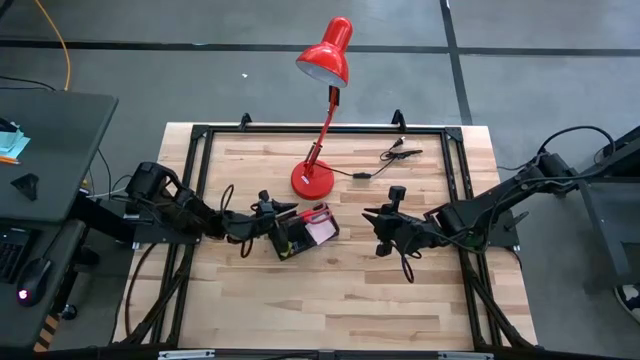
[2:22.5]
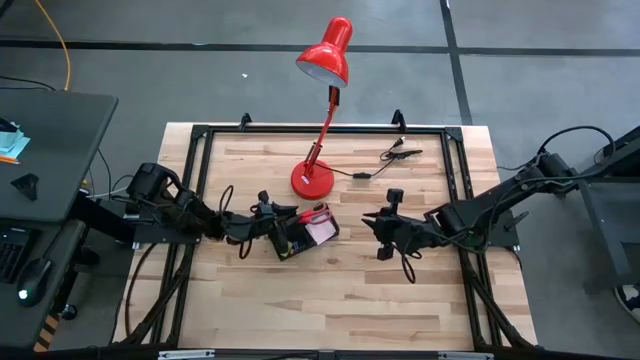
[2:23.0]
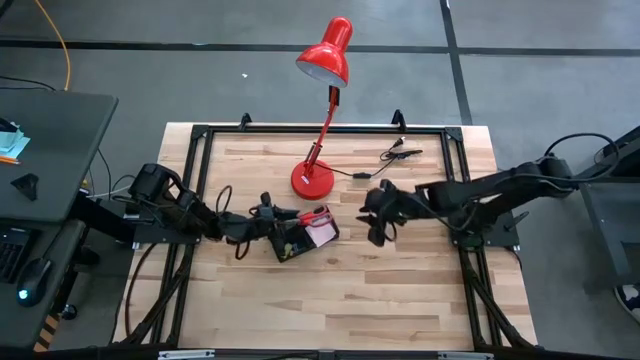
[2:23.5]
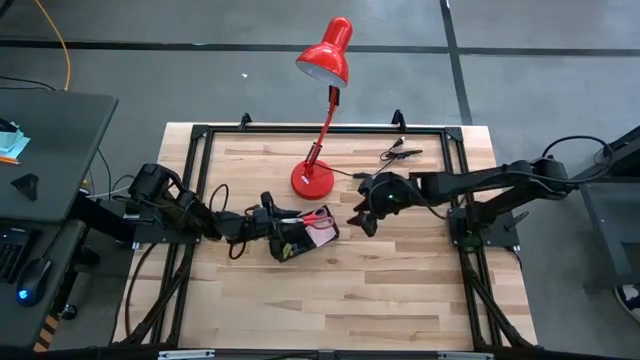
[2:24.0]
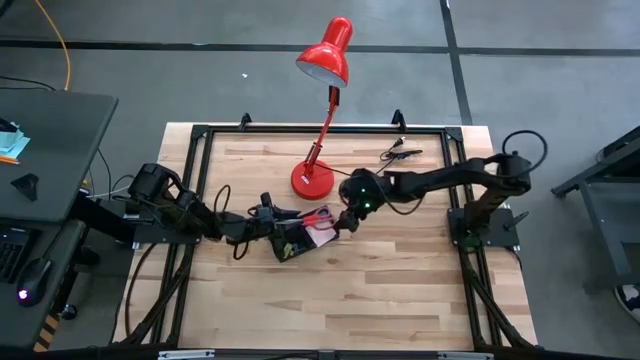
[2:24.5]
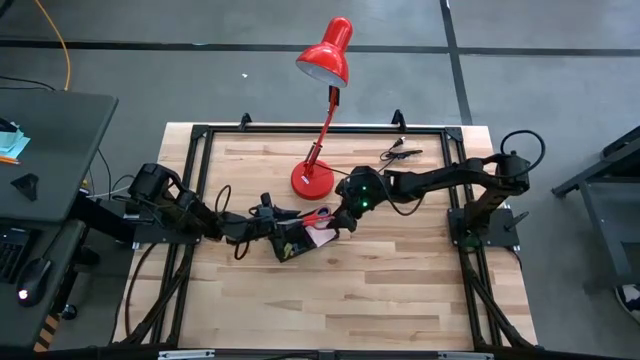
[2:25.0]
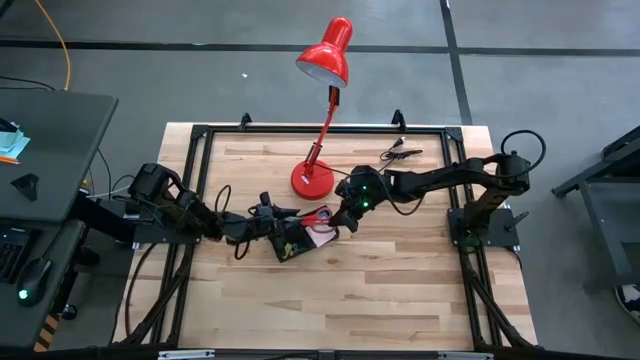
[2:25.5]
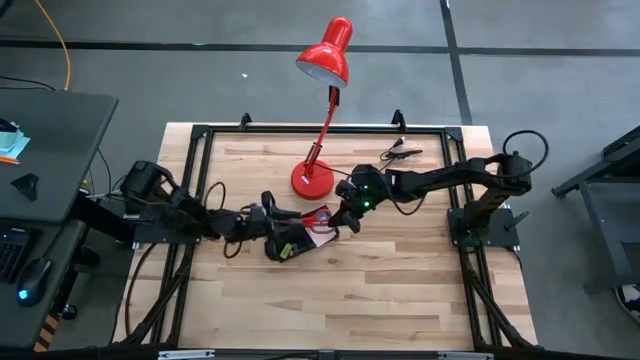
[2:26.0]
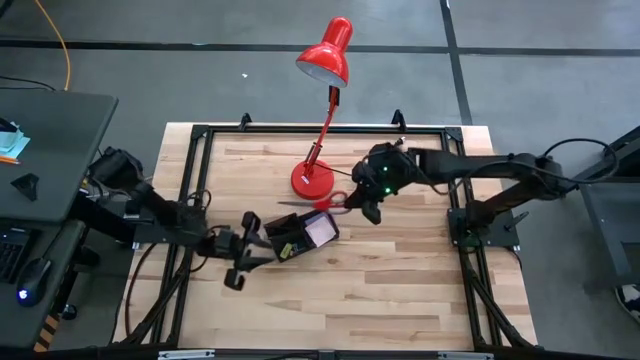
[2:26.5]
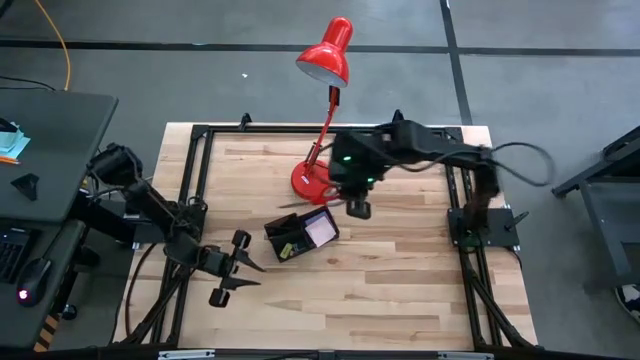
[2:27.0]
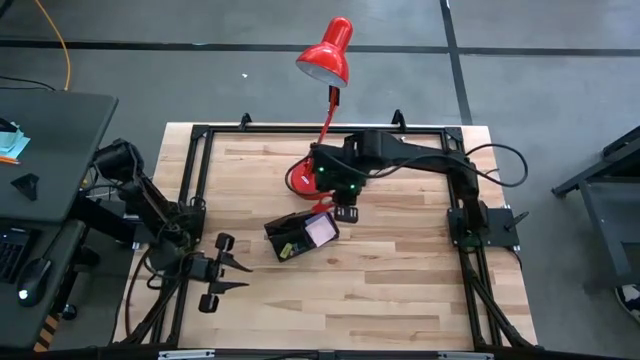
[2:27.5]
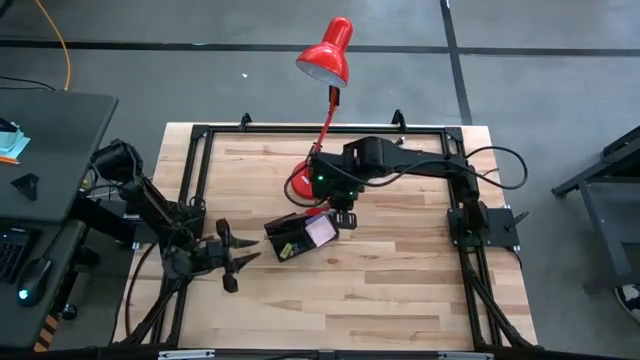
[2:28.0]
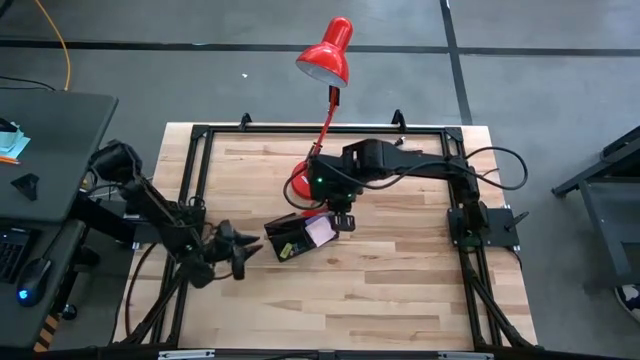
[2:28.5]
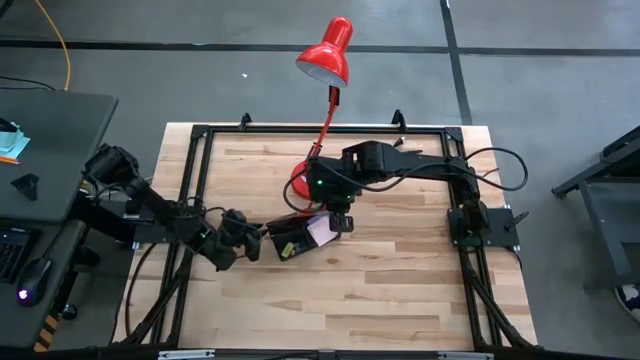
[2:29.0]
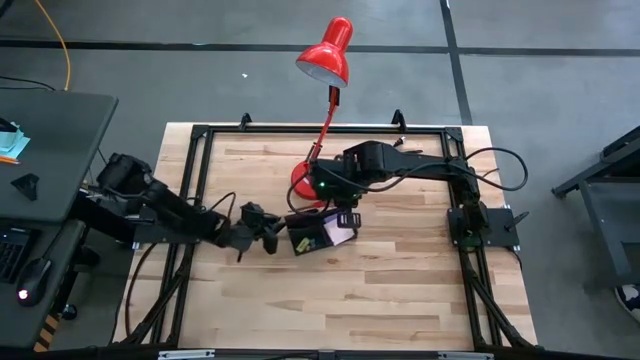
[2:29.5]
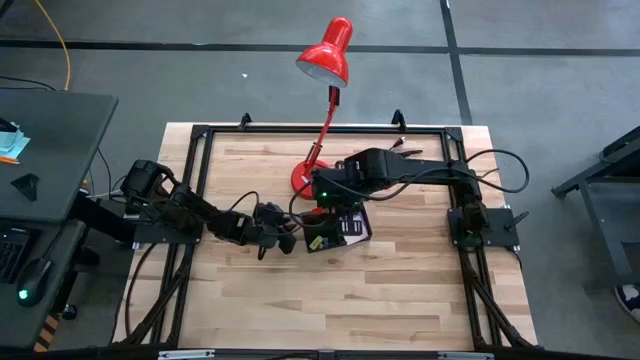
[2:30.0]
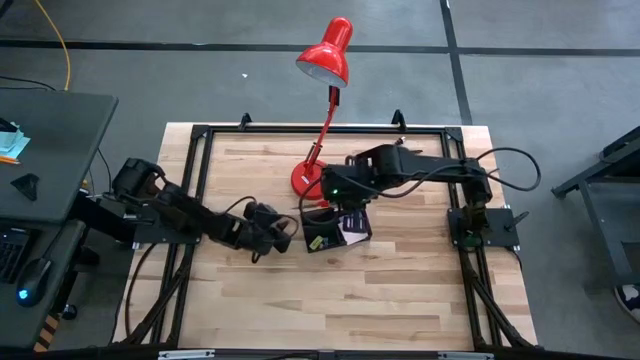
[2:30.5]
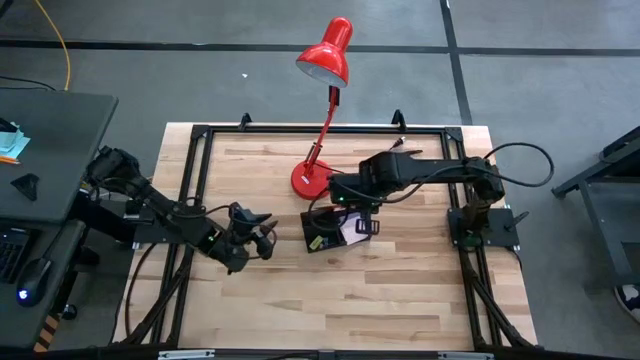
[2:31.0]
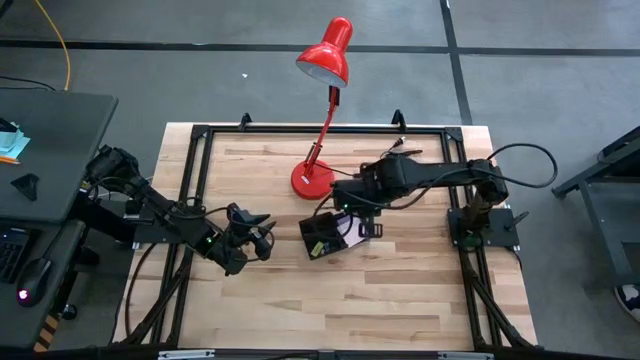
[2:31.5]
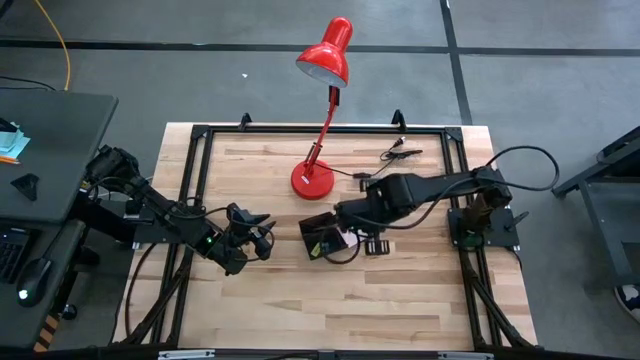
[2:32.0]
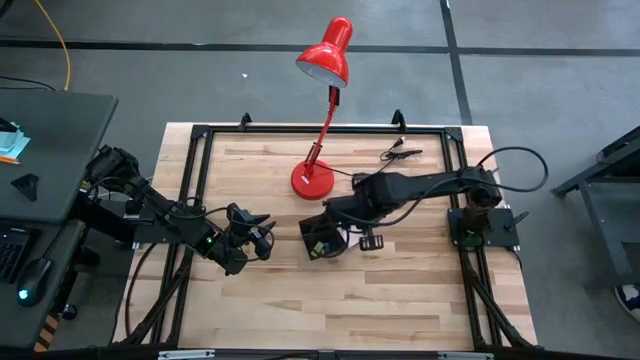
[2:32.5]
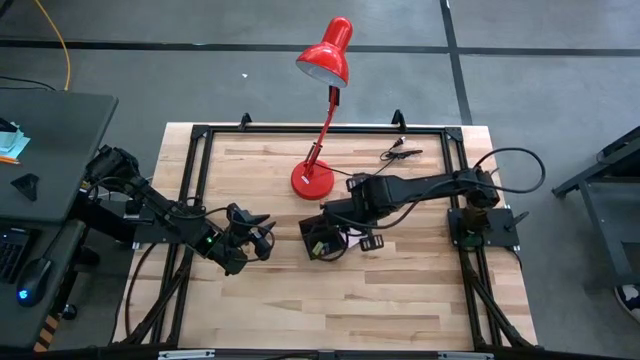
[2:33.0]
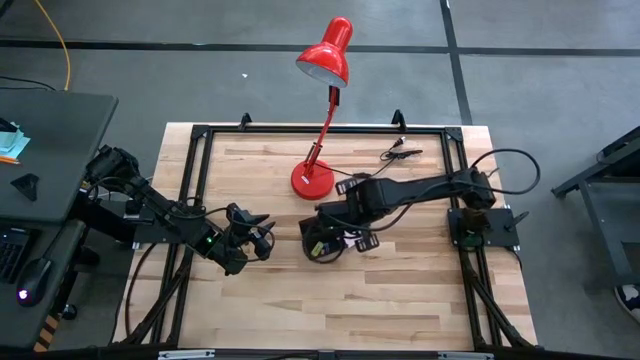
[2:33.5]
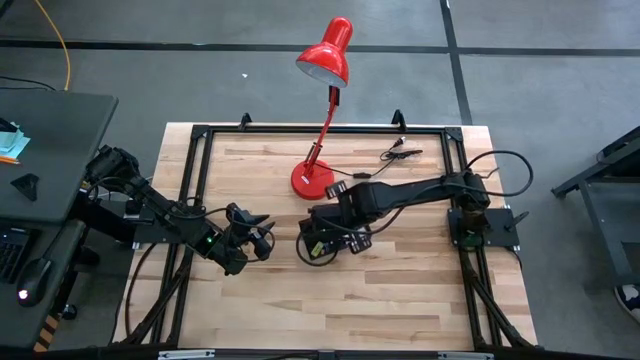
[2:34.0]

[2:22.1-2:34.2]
Task: Pick and place office supplies into organizer
Put the red scissors into the black desk organizer

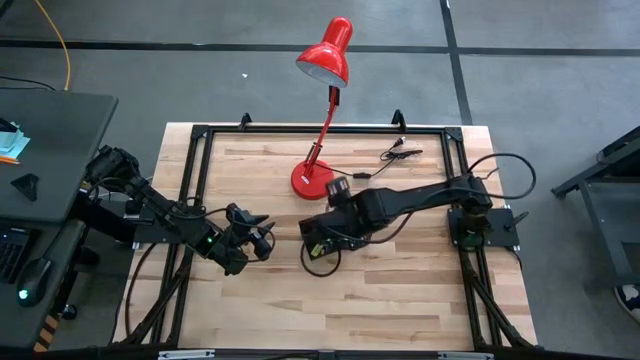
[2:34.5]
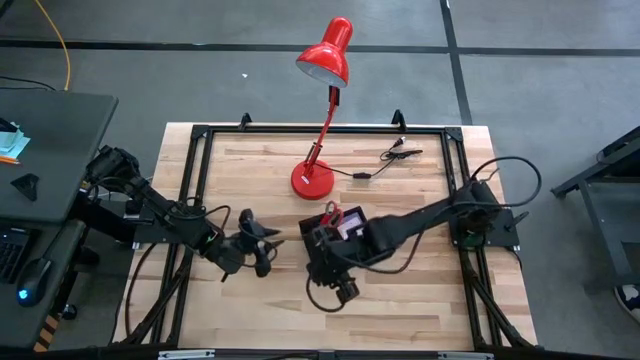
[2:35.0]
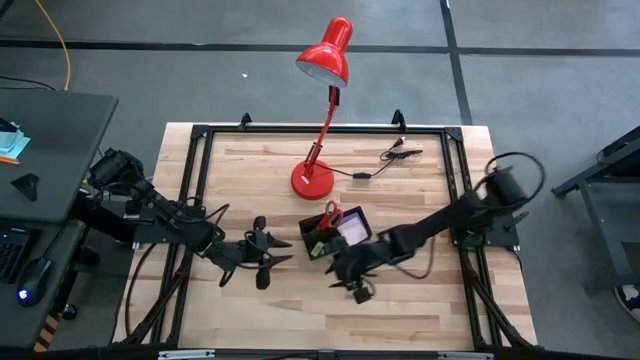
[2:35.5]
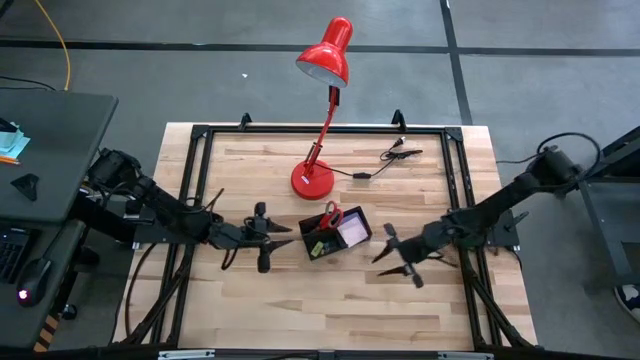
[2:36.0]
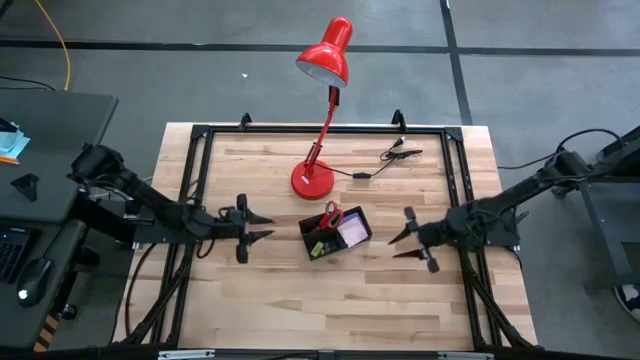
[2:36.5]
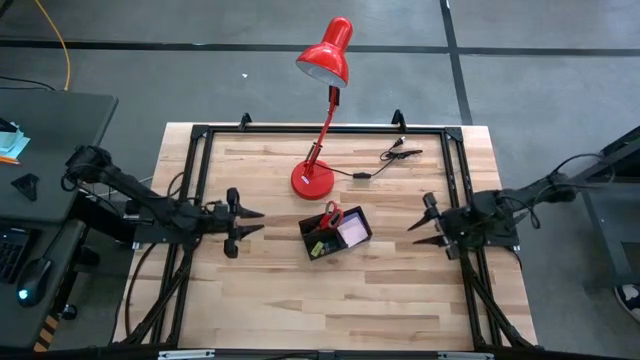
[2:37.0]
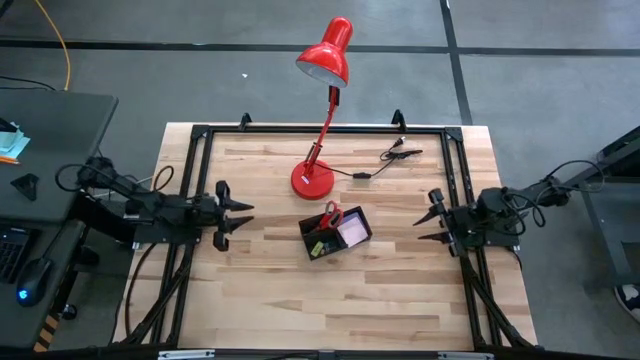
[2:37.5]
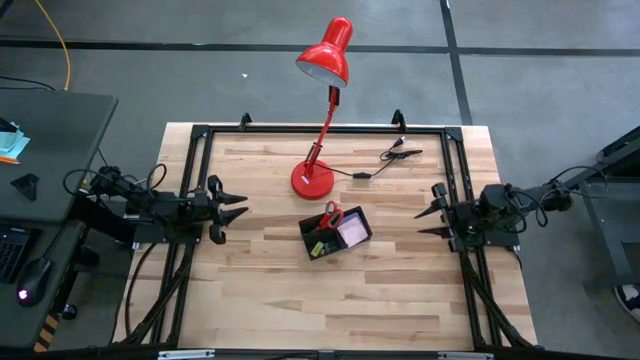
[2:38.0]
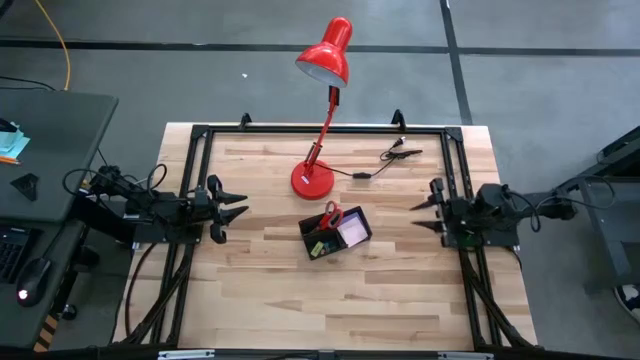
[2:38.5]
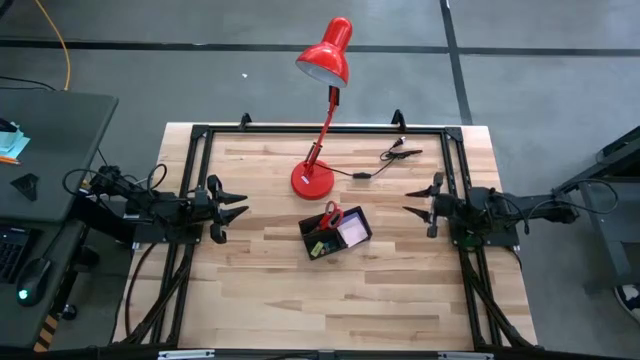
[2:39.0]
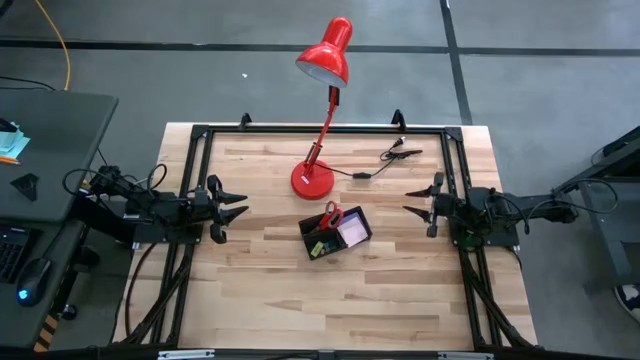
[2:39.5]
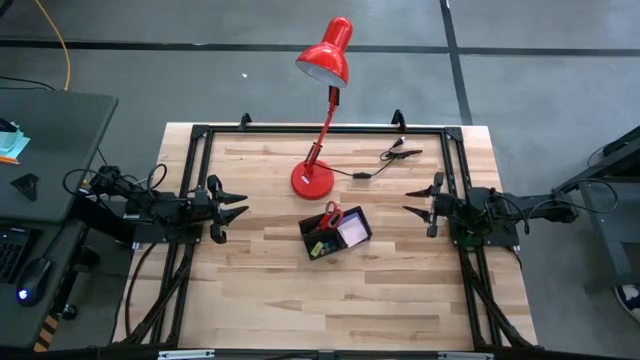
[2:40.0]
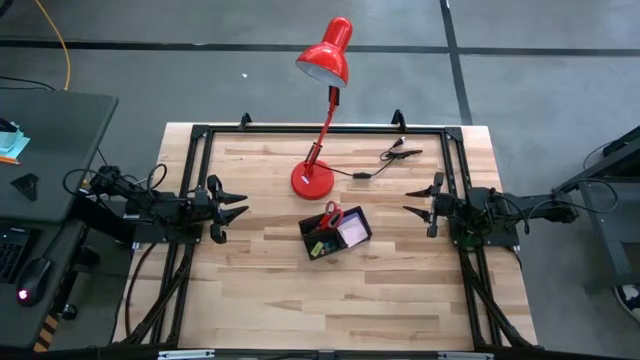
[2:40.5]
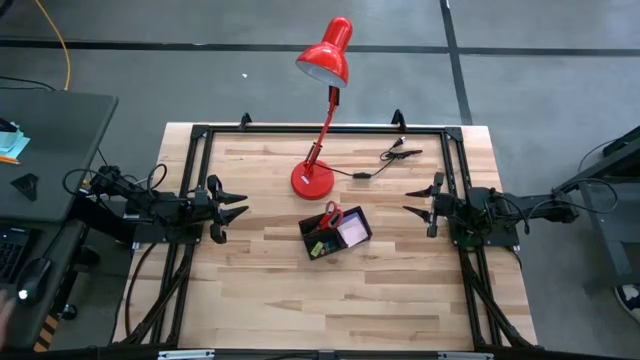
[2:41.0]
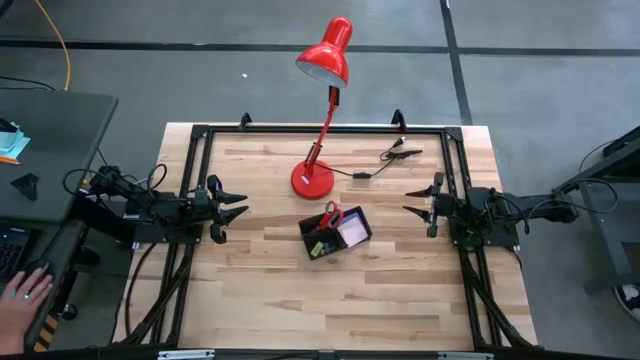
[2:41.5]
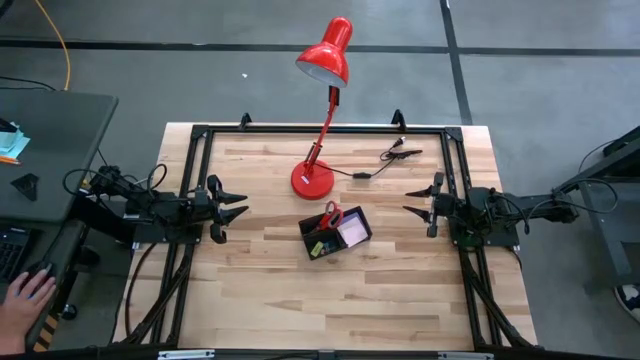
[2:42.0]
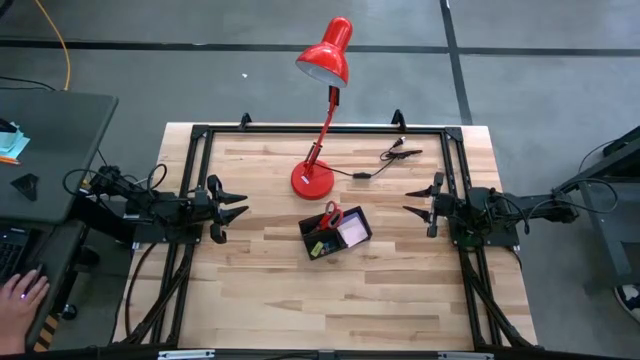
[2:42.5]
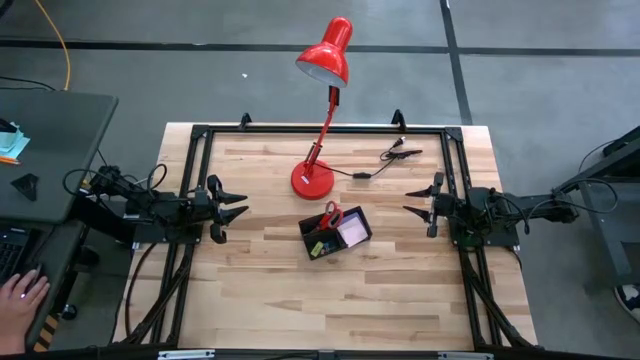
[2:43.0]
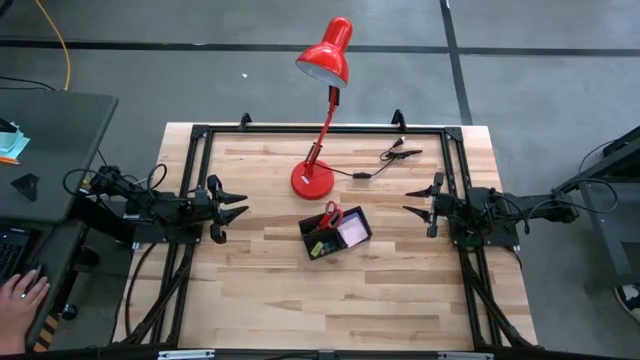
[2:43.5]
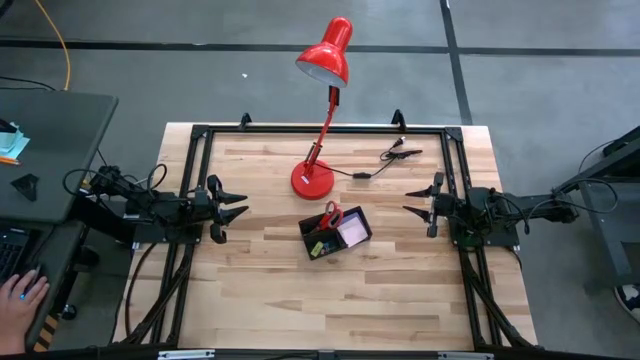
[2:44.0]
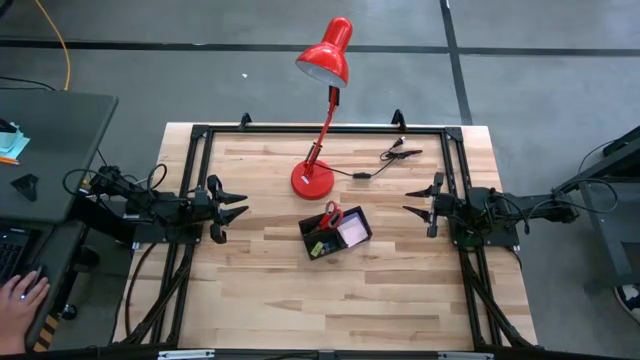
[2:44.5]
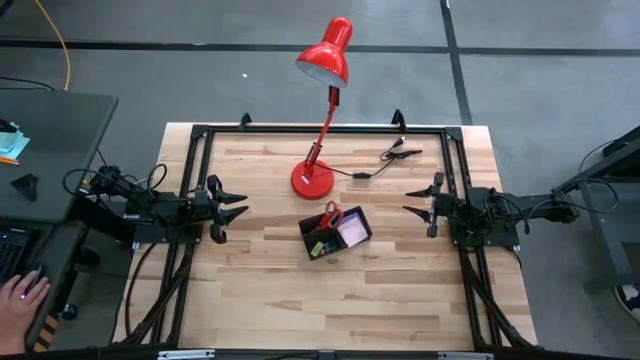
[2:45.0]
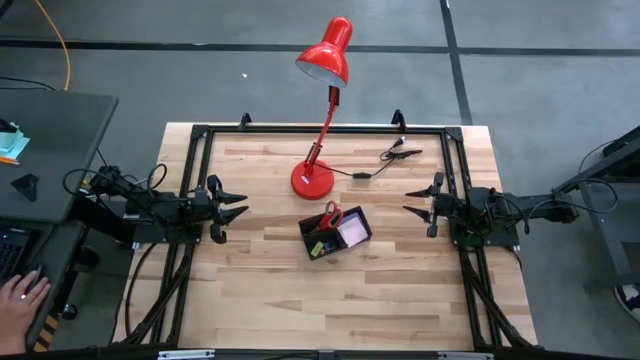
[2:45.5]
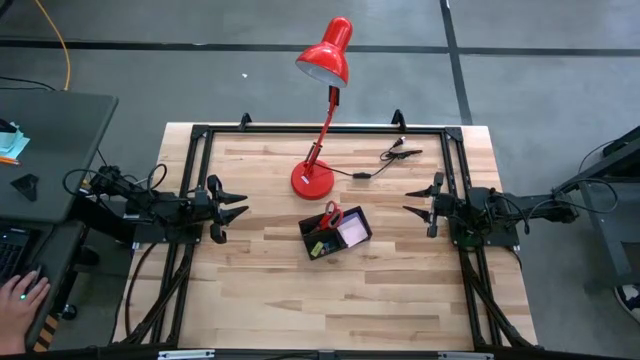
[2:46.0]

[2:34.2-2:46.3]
Return to Home Position
